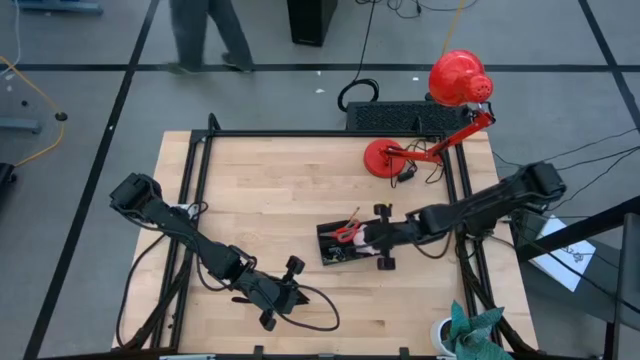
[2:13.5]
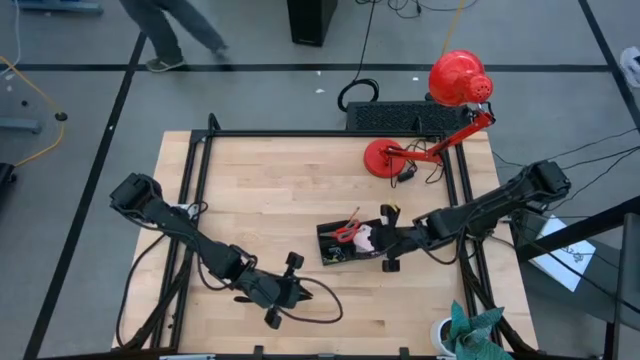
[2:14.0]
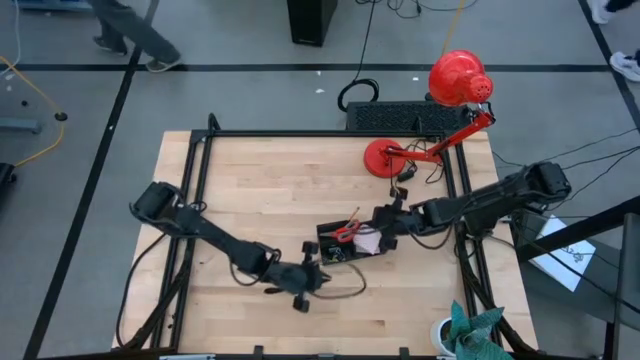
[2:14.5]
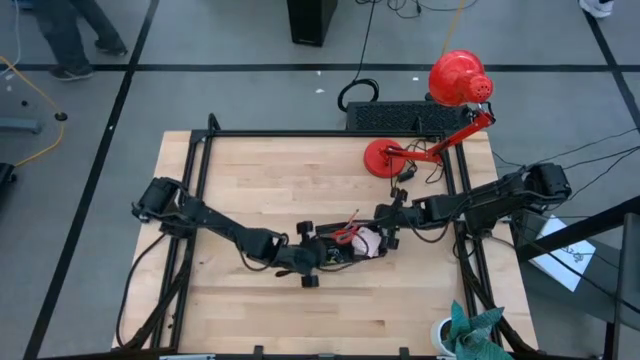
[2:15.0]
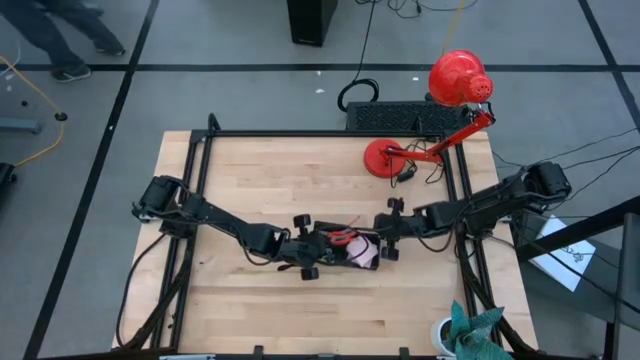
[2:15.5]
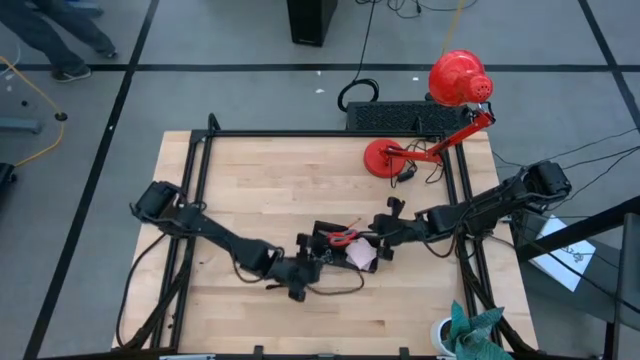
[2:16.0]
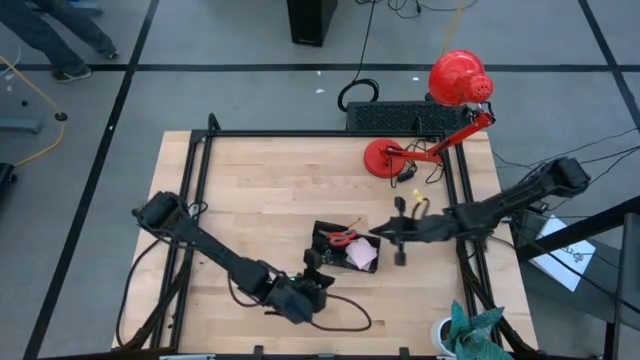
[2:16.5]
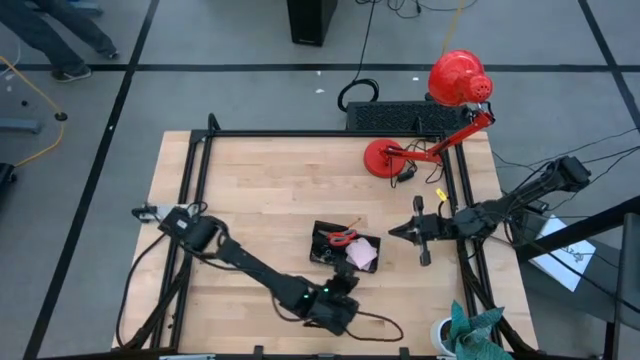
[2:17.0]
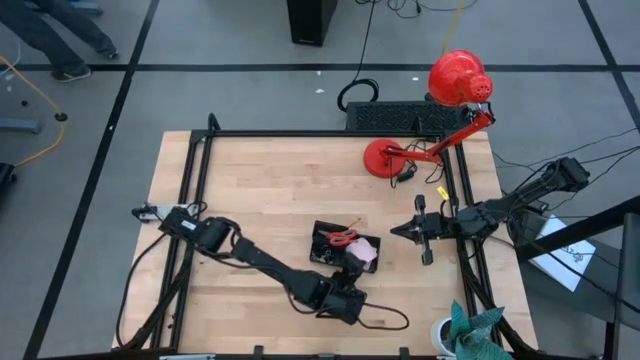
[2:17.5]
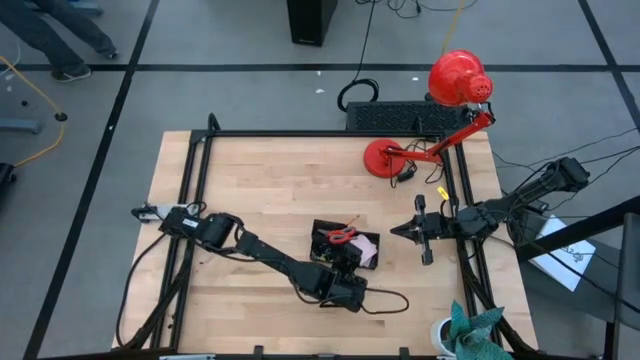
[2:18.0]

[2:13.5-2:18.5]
Task: Pick and place office supplies into organizer
Adjust the desk organizer

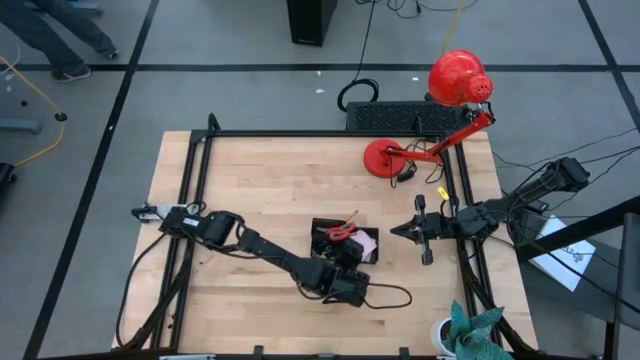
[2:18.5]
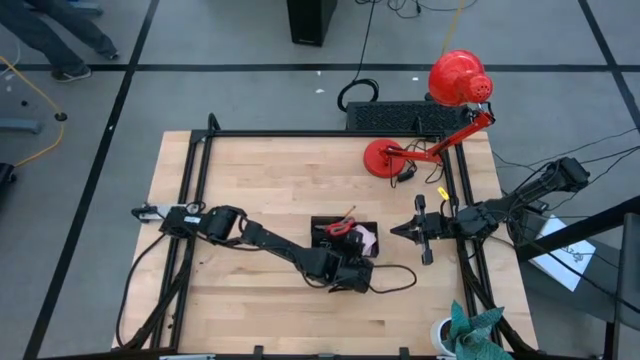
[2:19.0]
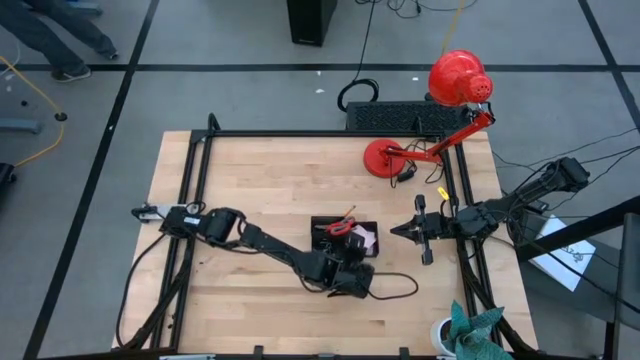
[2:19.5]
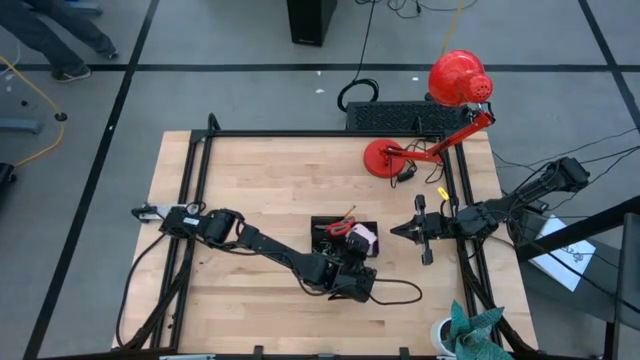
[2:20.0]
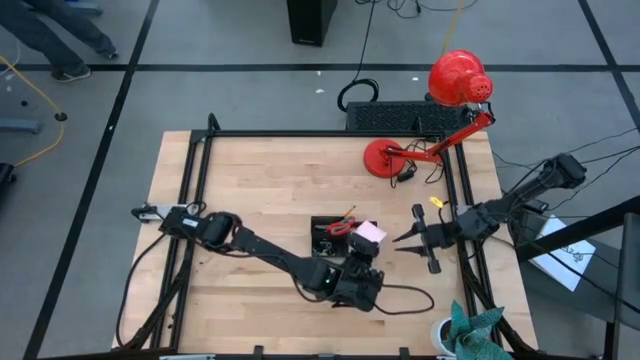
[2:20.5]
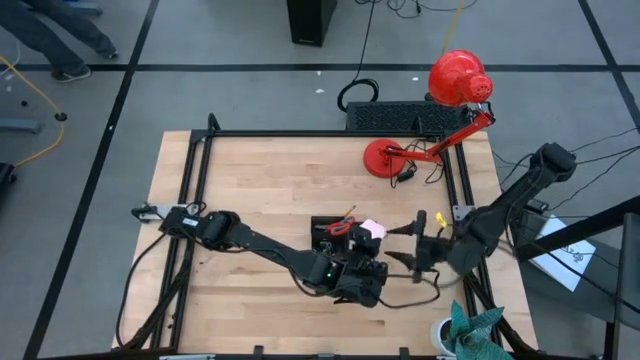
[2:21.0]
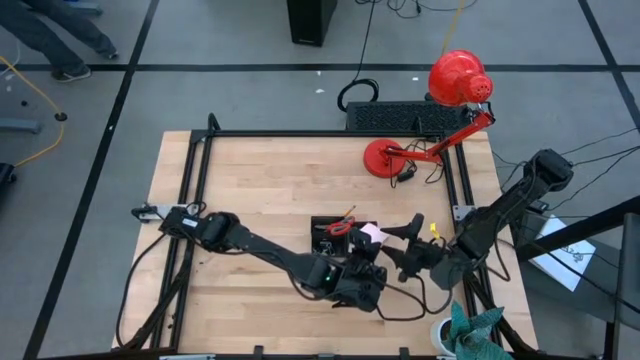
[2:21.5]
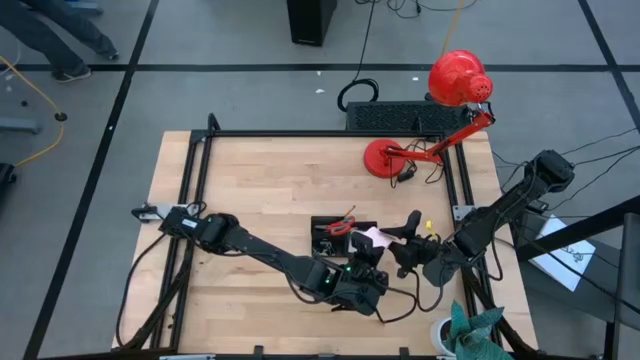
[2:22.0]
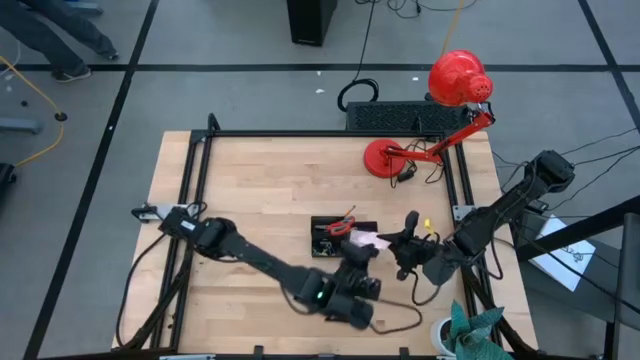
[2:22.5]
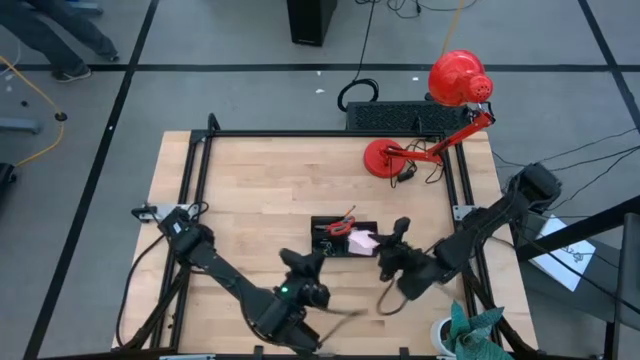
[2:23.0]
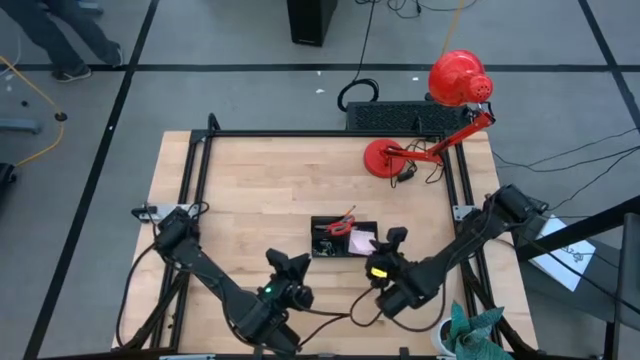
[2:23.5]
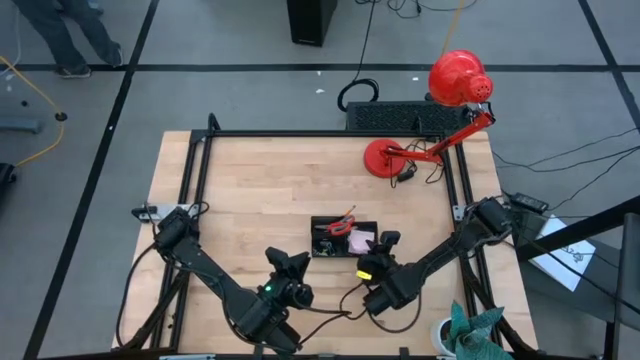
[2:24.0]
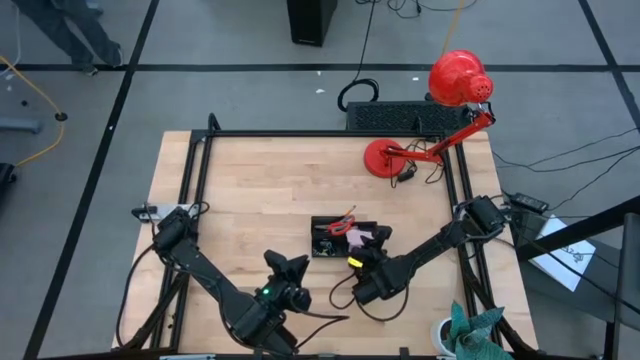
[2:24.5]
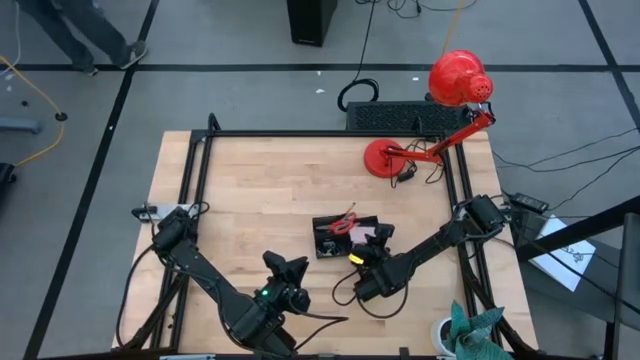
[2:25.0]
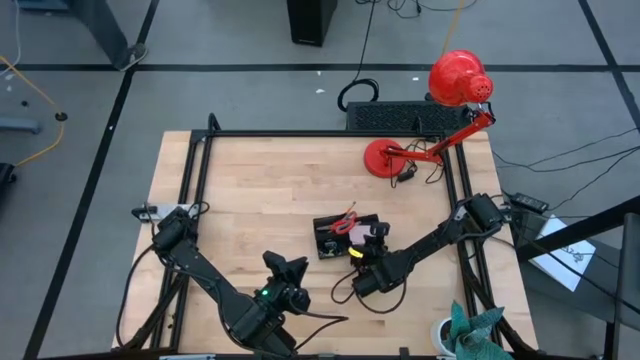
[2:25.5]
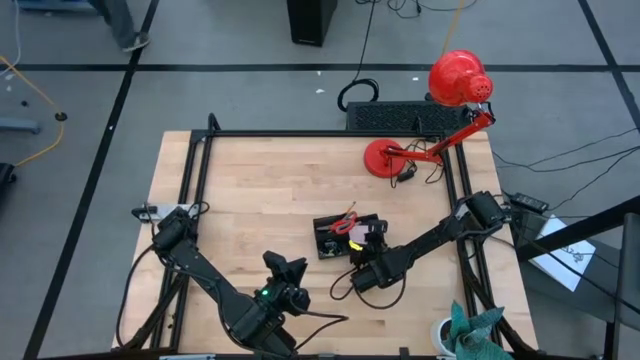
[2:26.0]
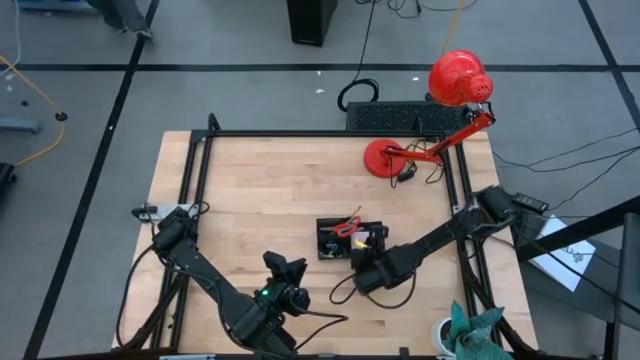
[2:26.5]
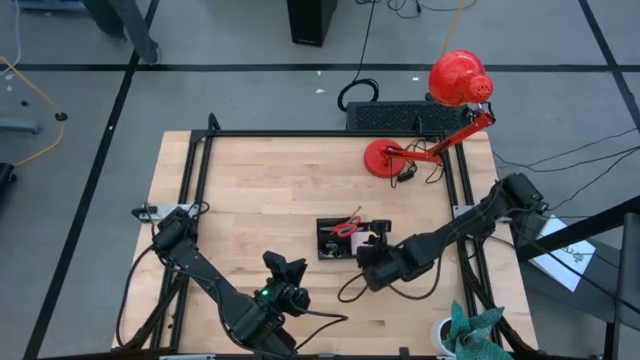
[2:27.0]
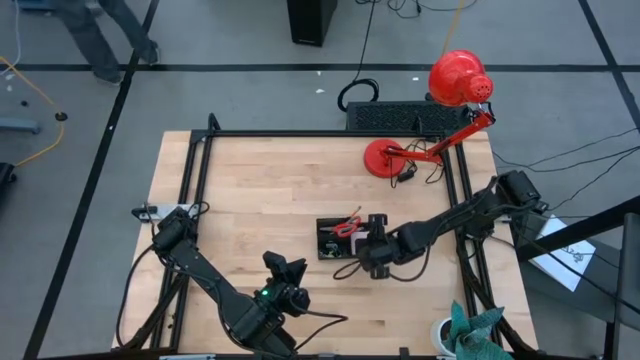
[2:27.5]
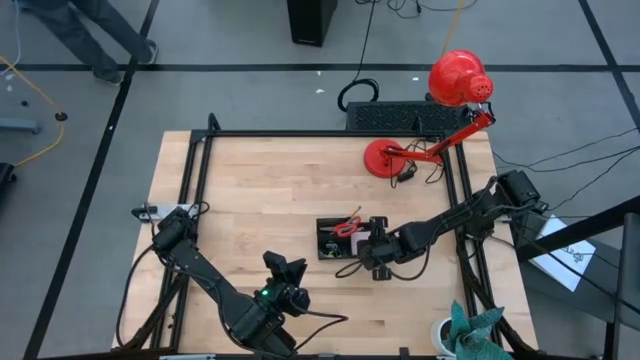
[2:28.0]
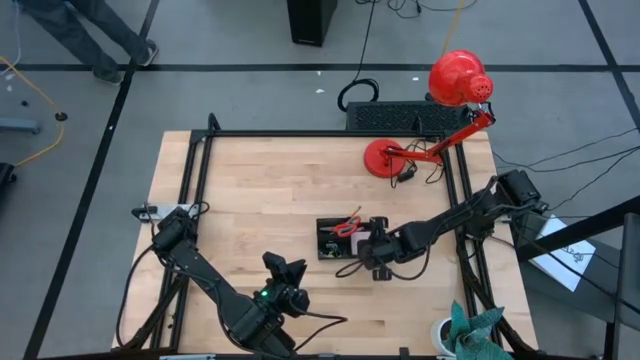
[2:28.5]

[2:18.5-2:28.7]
Adjust the sticky notes

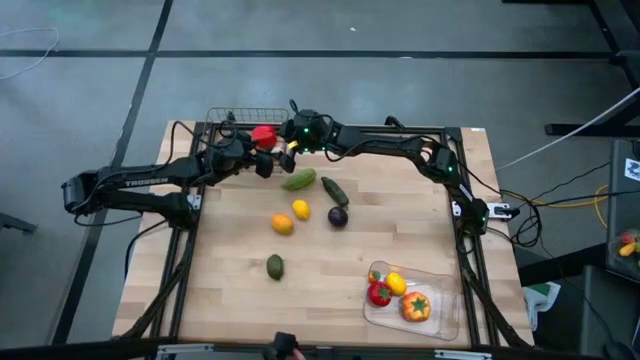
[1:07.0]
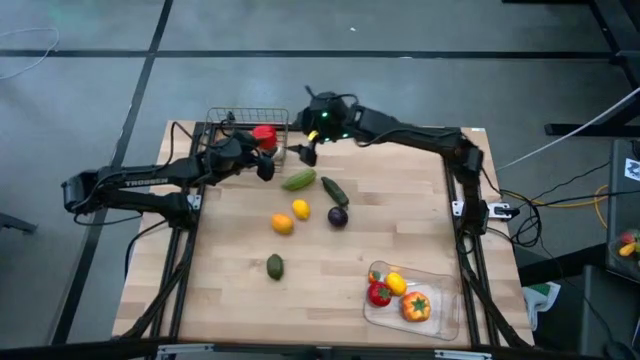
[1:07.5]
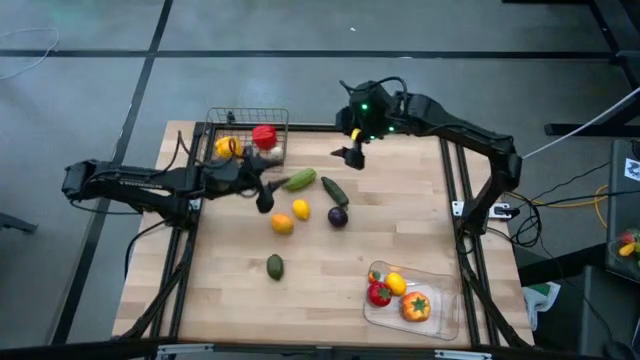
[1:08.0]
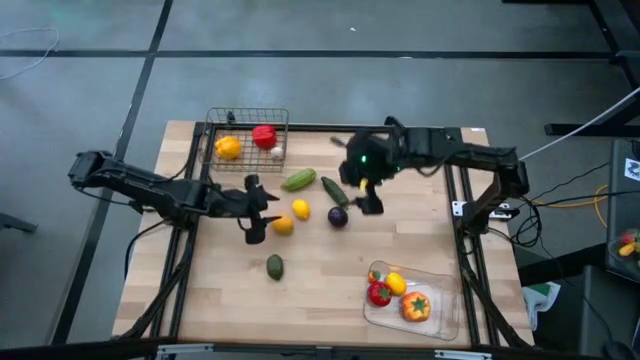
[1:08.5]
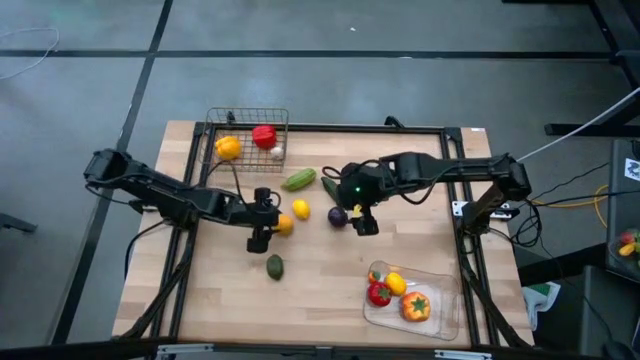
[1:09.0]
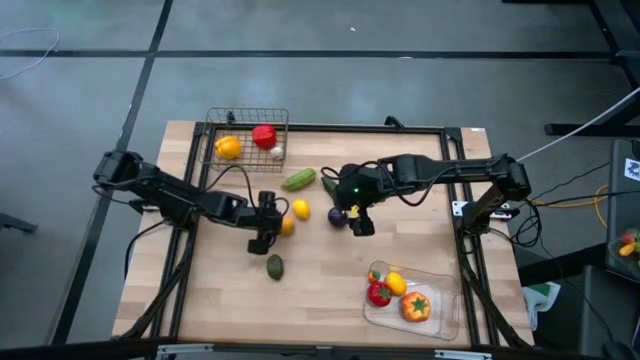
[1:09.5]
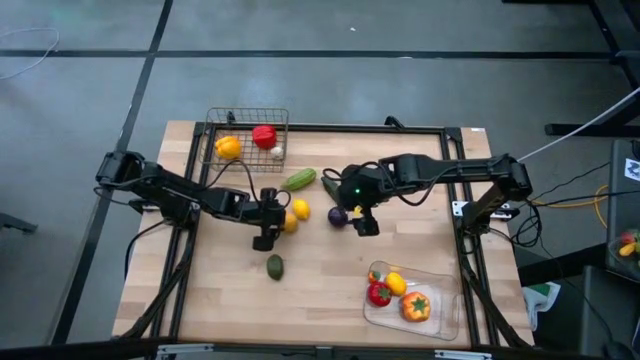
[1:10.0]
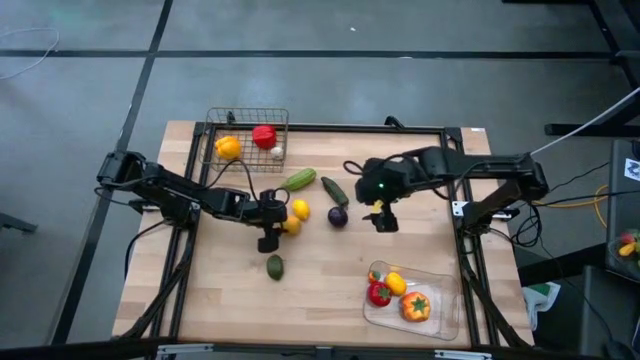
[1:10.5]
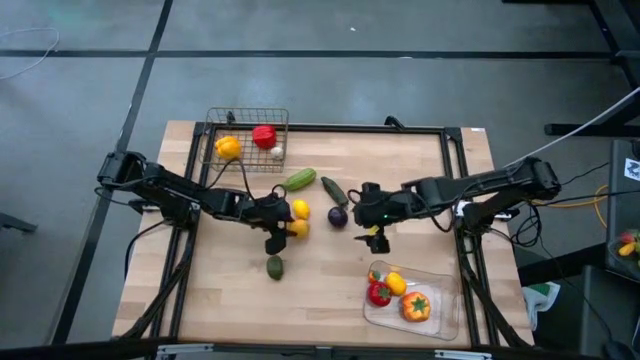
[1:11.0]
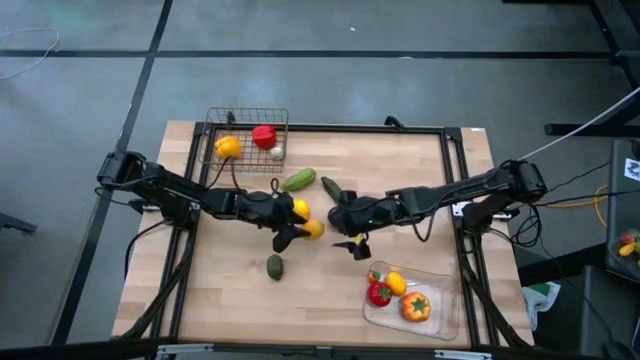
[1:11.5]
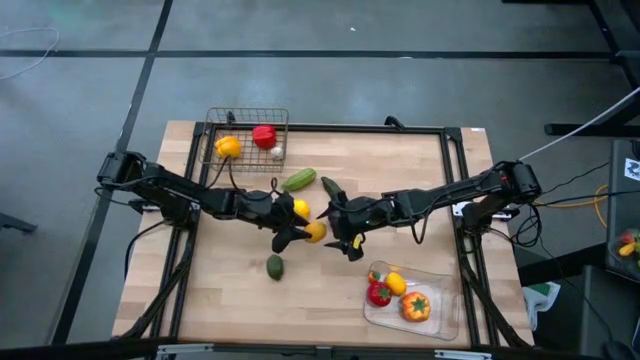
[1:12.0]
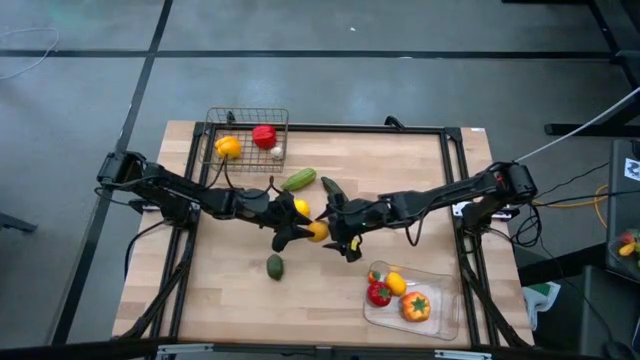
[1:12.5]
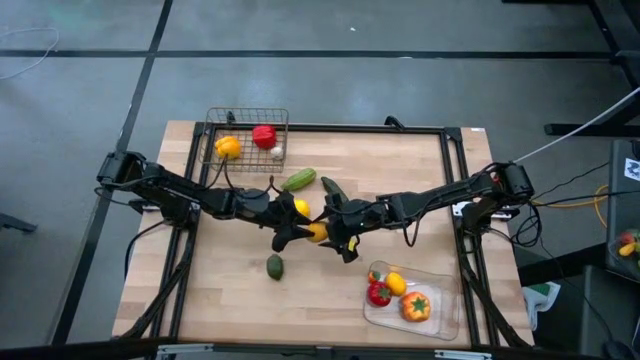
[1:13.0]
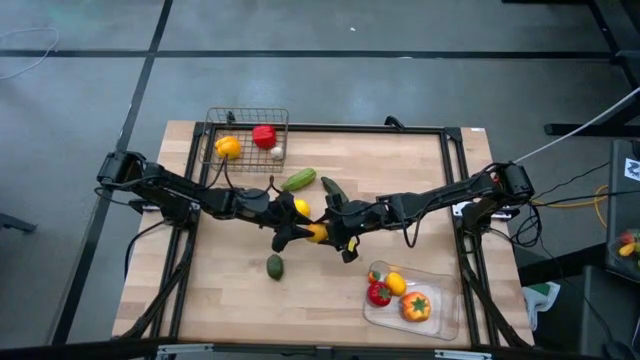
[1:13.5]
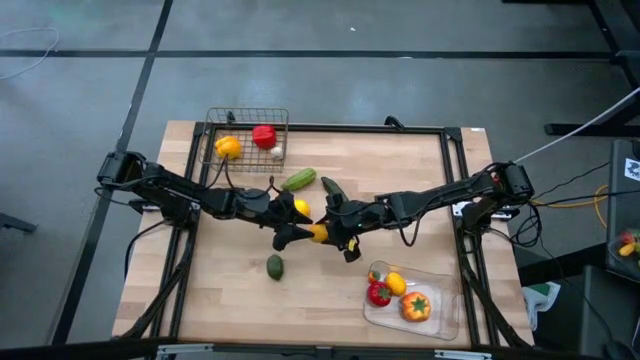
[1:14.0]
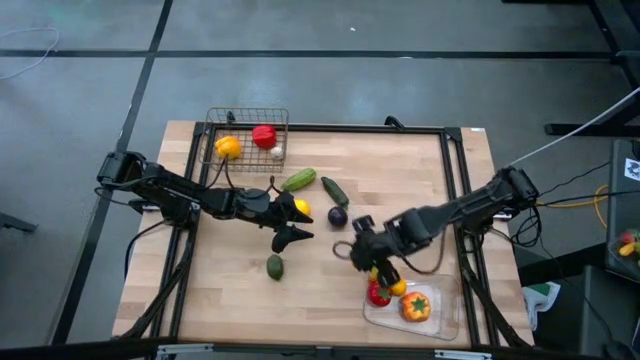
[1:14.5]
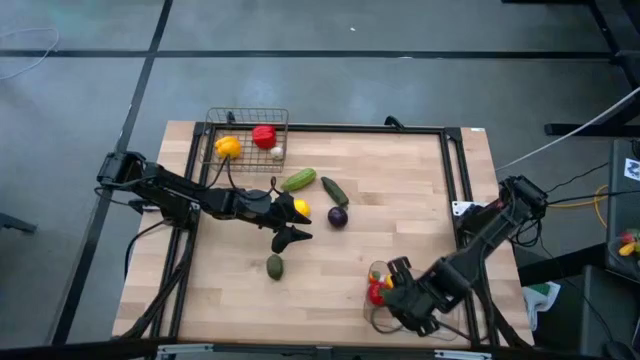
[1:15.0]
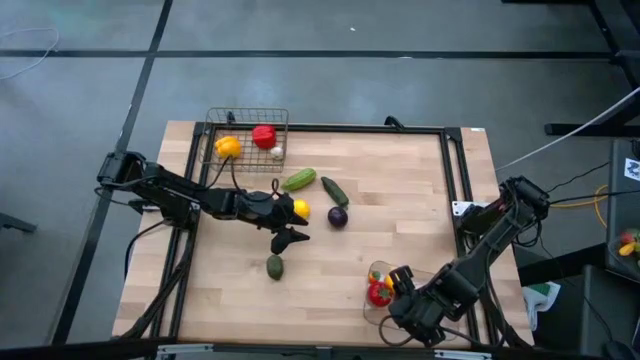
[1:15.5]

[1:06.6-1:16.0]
Task: Sort produce into baskets
Put the bottom lemon into the transparent bin
